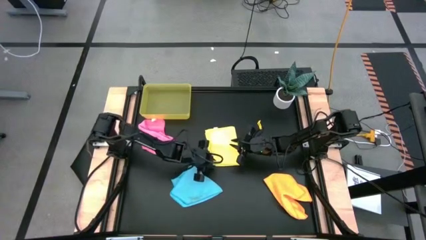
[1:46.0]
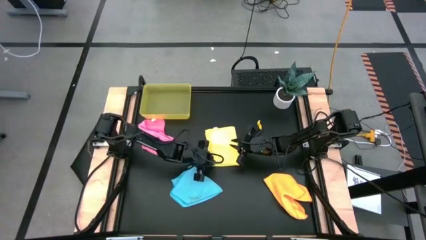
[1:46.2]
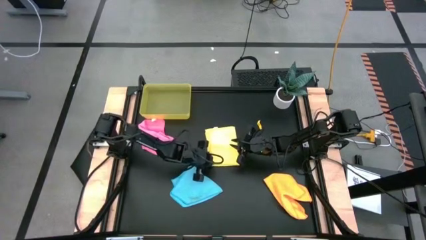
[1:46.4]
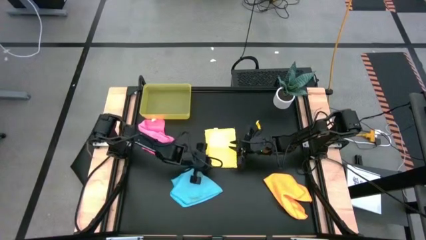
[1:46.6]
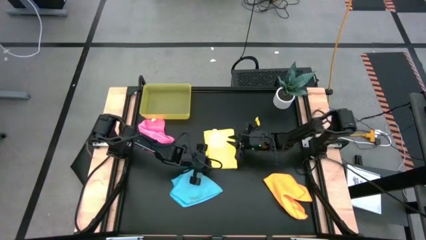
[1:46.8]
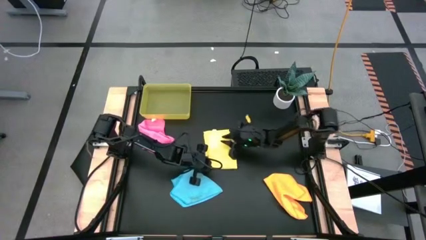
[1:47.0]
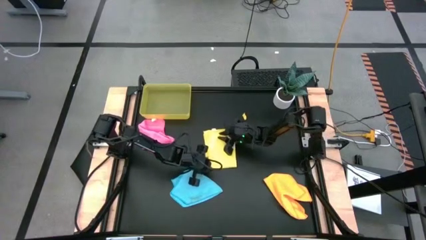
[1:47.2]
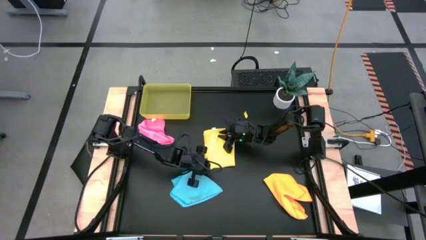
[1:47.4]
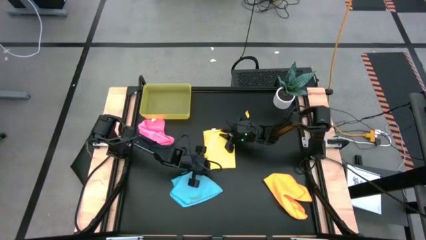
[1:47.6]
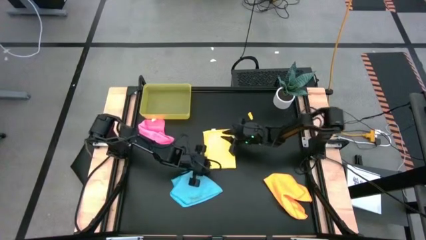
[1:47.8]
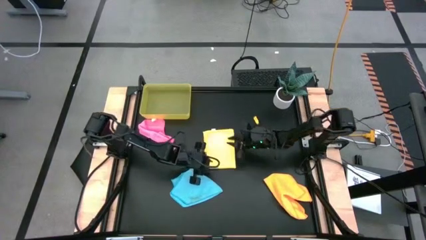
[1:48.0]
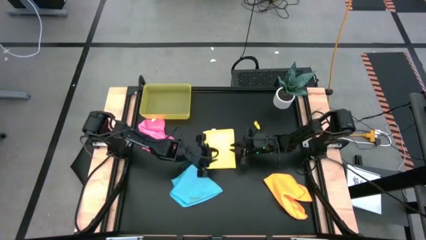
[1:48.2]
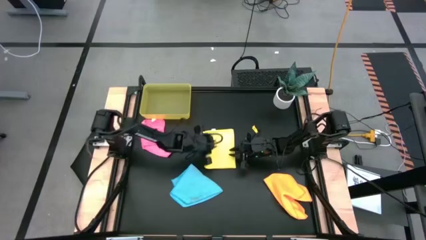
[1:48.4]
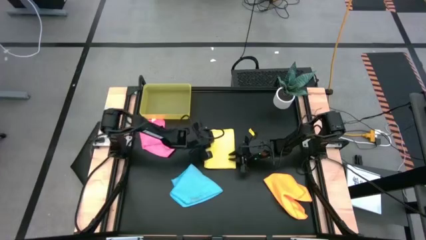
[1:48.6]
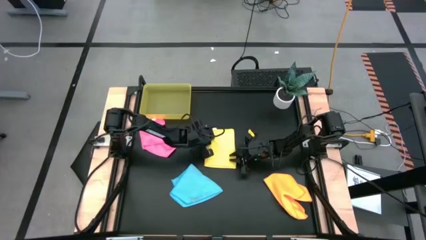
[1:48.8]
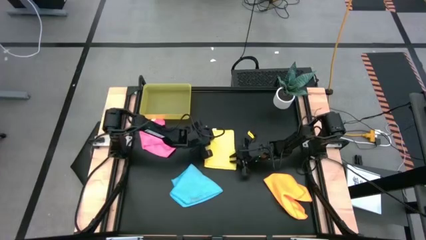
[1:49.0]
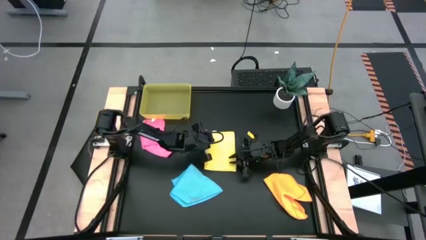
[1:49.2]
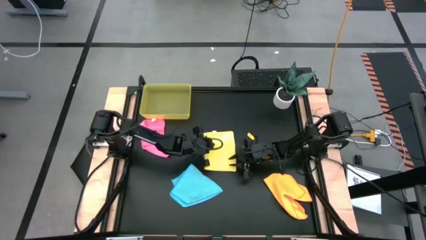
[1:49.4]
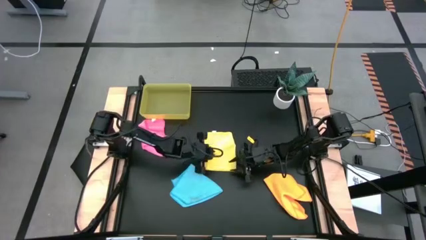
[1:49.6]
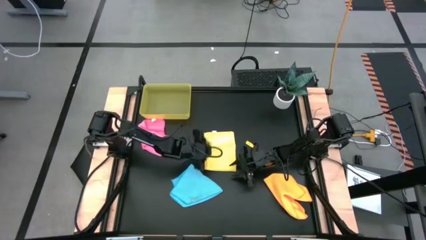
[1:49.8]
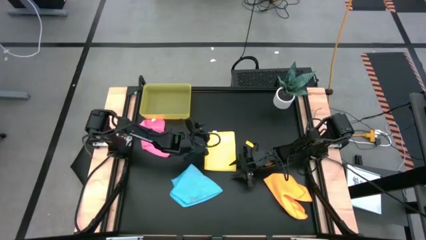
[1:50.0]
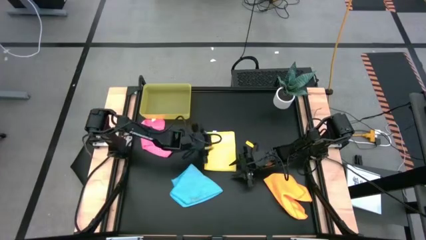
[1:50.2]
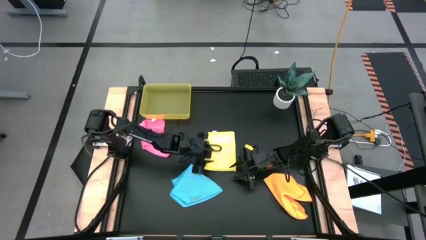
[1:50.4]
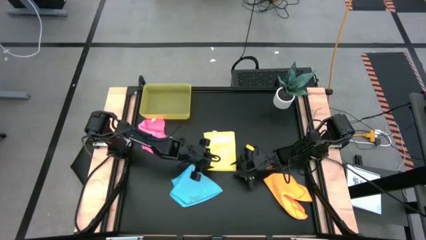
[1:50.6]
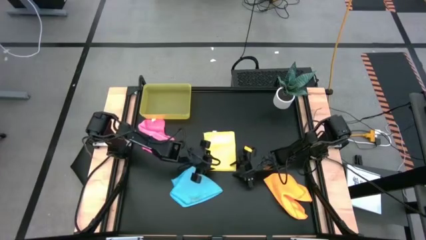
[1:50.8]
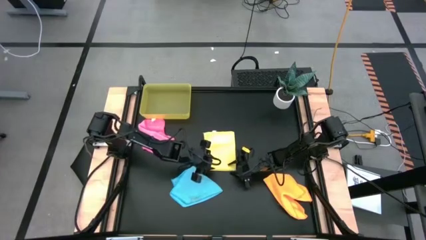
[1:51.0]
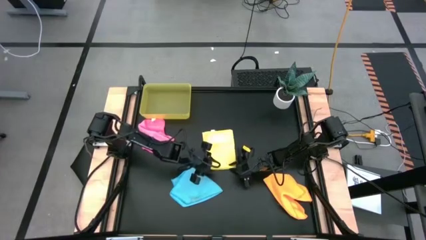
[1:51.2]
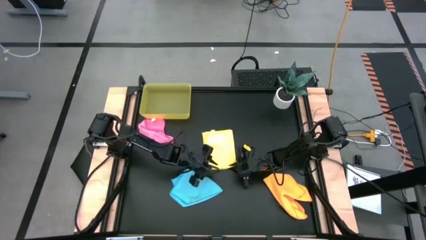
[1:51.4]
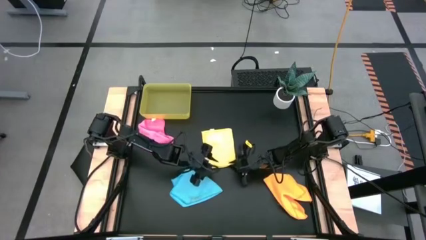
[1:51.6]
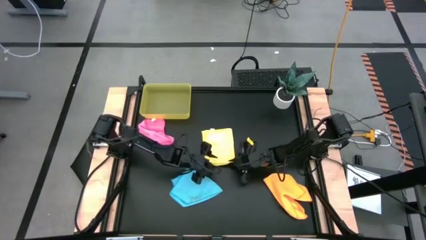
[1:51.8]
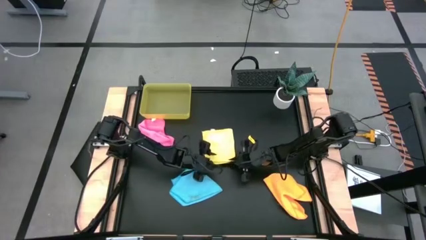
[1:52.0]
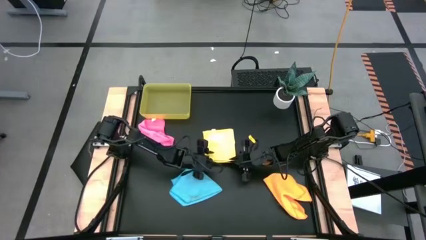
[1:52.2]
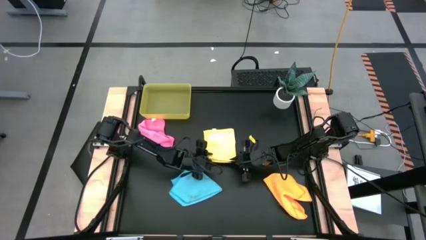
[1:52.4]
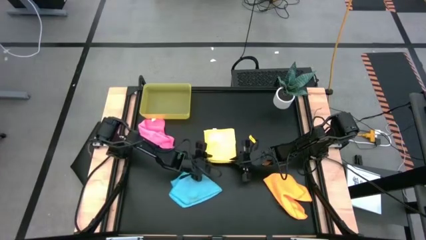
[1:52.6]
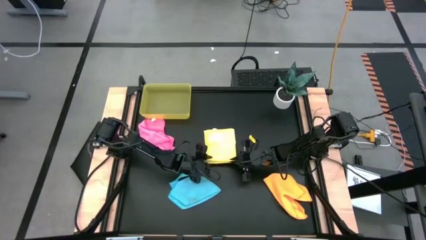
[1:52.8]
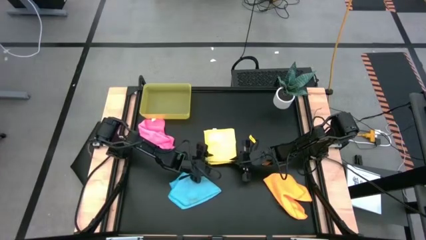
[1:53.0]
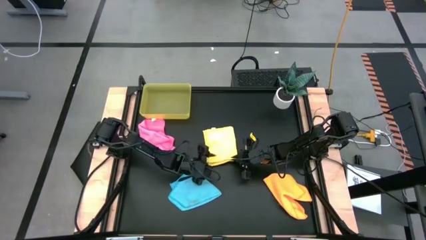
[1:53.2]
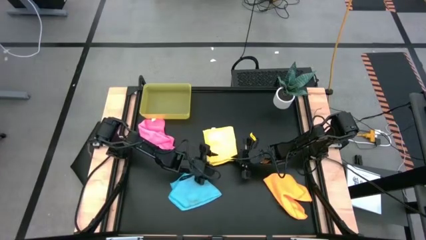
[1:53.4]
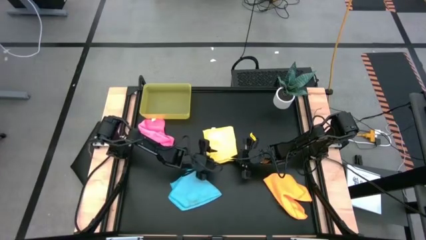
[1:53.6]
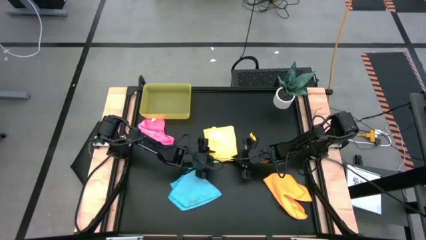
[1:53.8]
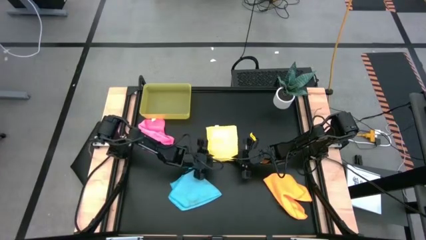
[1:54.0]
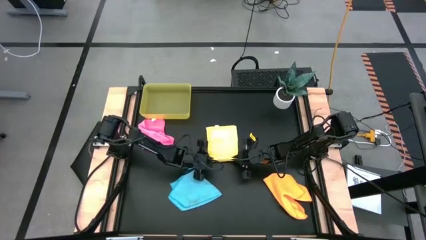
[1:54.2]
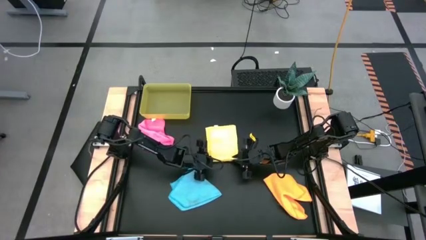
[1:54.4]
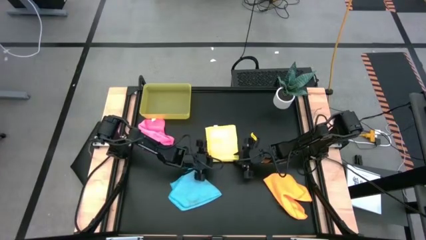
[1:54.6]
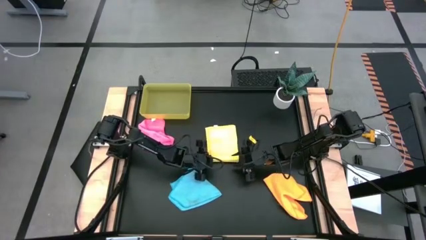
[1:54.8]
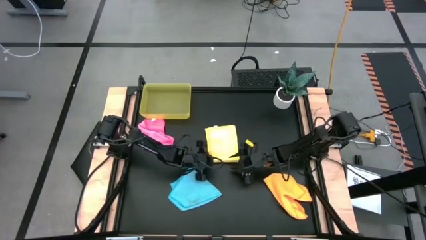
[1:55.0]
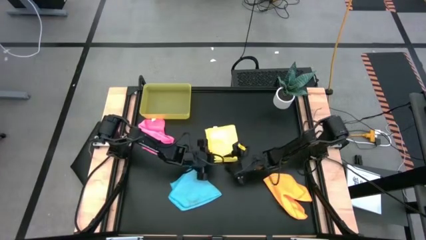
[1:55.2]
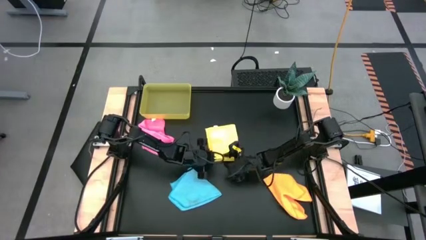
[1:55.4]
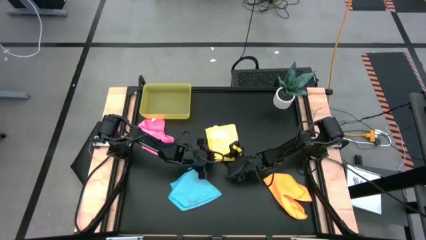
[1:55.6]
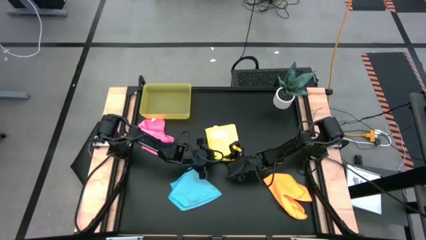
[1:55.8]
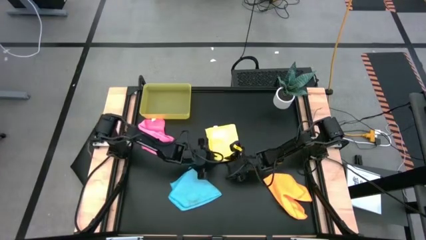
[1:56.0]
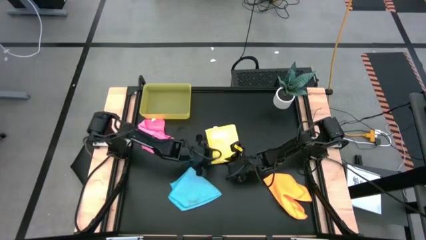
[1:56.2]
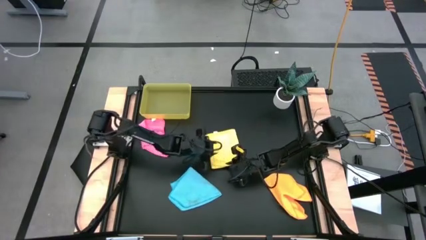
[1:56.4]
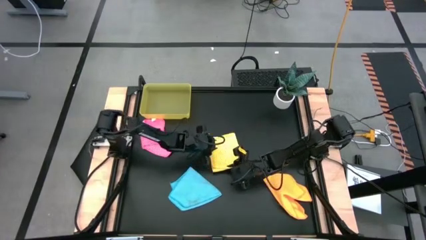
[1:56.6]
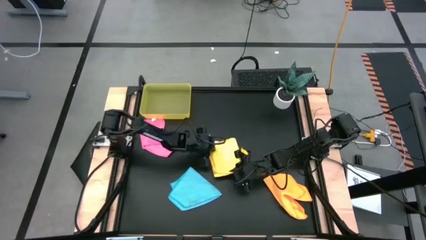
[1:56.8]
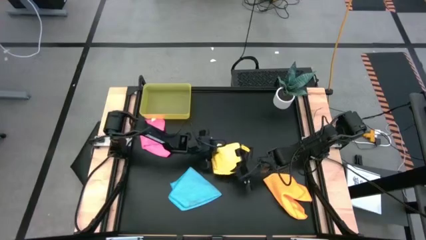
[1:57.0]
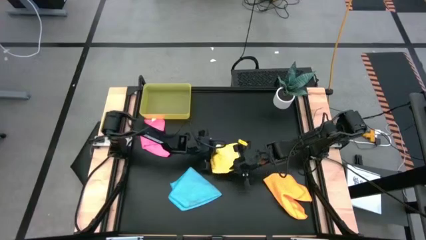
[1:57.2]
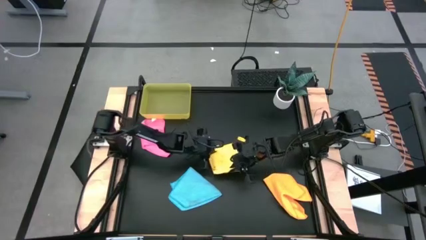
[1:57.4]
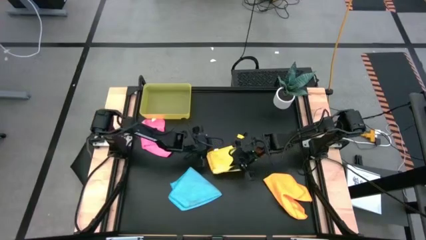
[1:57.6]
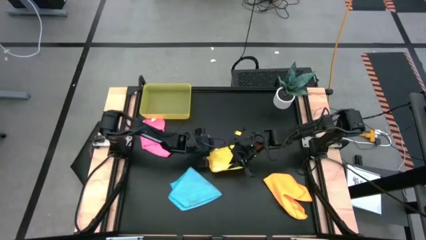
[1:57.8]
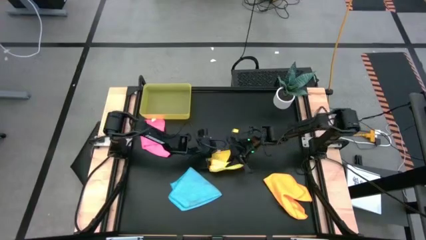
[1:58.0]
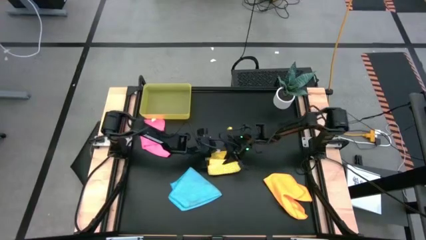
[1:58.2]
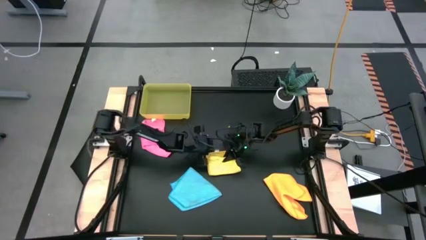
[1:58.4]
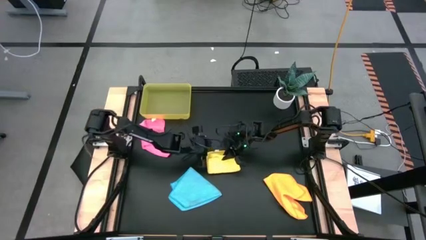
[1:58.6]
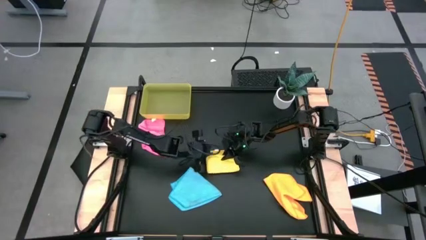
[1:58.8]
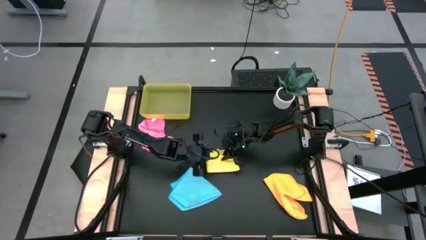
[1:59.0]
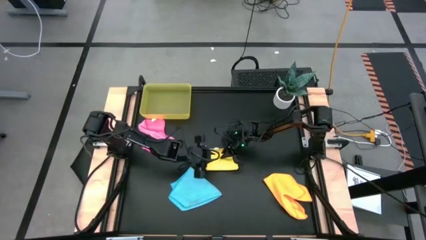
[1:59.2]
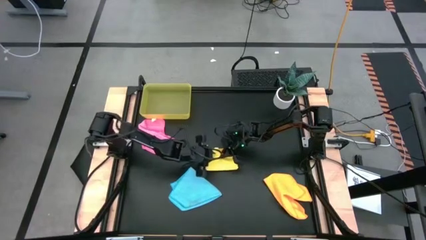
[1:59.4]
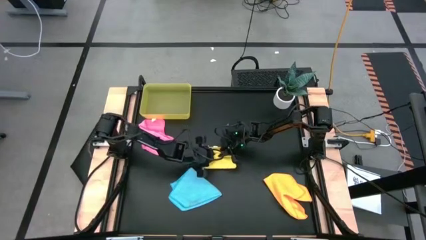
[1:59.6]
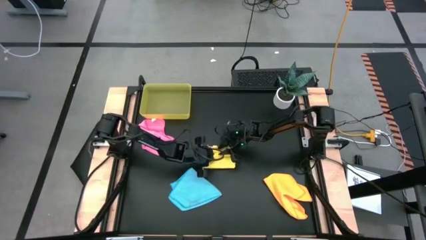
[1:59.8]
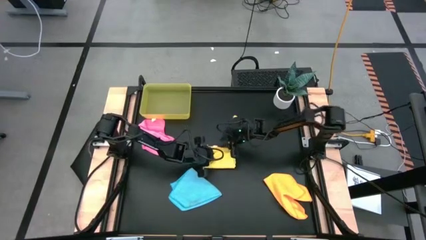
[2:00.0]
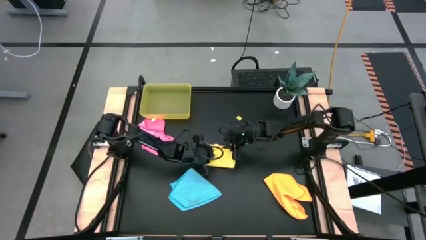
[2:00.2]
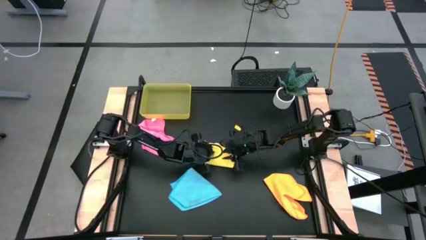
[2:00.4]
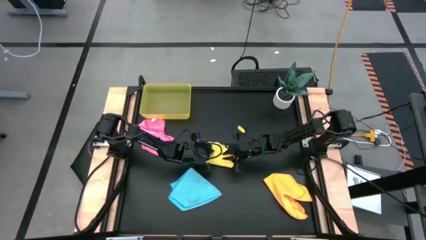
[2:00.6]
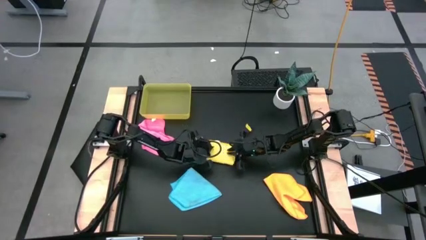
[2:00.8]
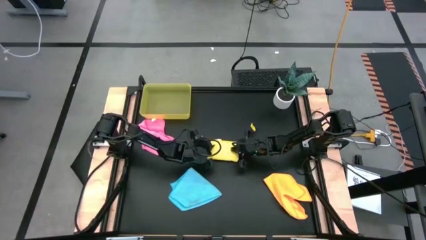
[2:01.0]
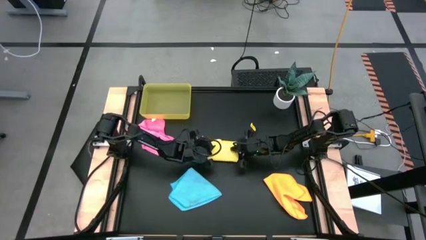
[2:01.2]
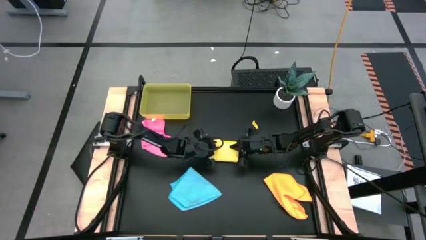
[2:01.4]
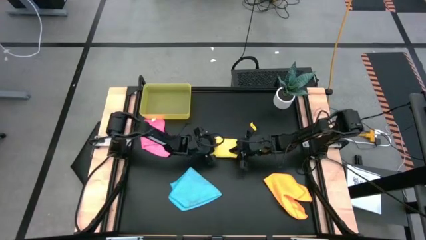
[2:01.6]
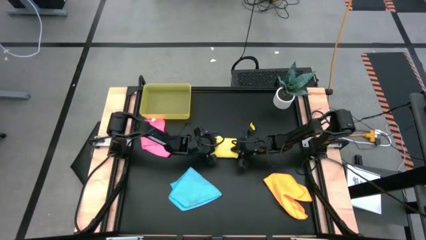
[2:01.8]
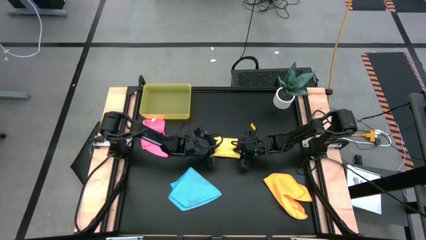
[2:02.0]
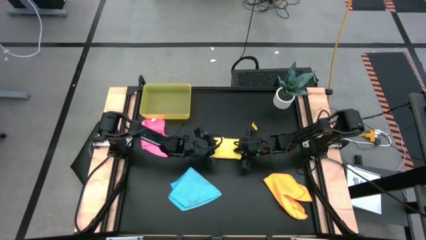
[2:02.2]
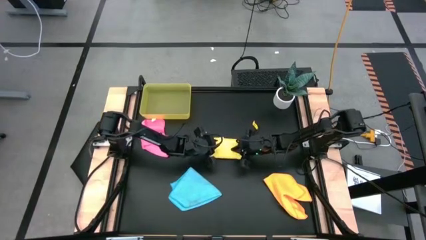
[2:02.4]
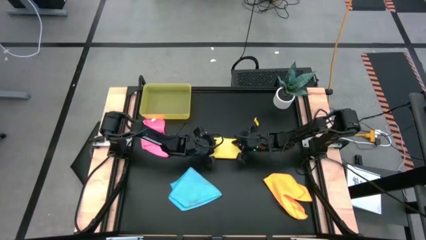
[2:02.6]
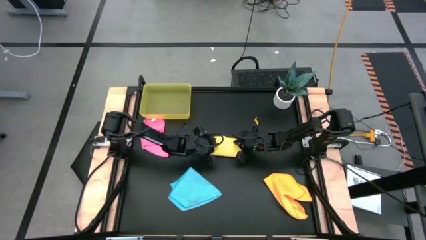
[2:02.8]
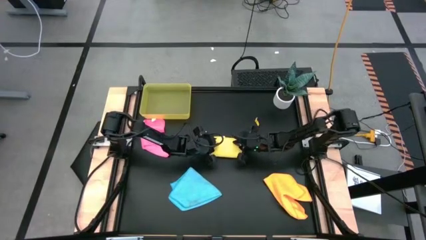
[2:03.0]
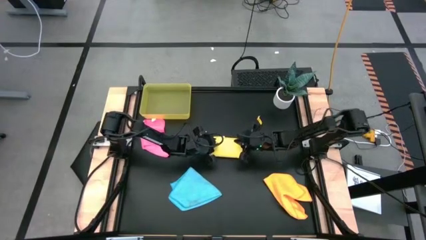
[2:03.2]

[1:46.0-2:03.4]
Task: Fold microfiber towels
Fold the yellow microfiber cloth
